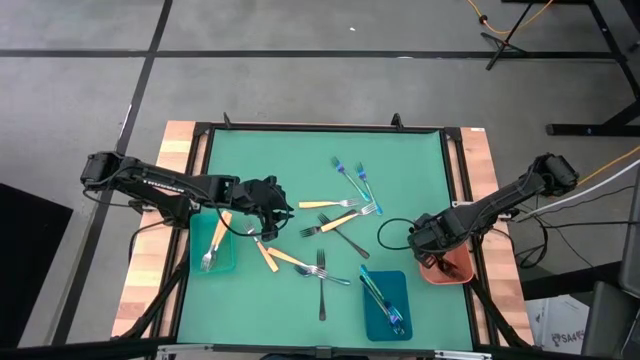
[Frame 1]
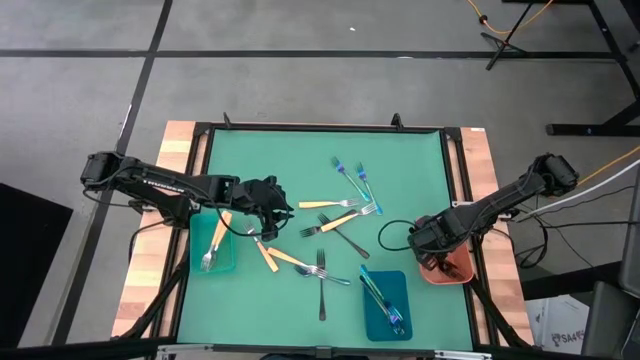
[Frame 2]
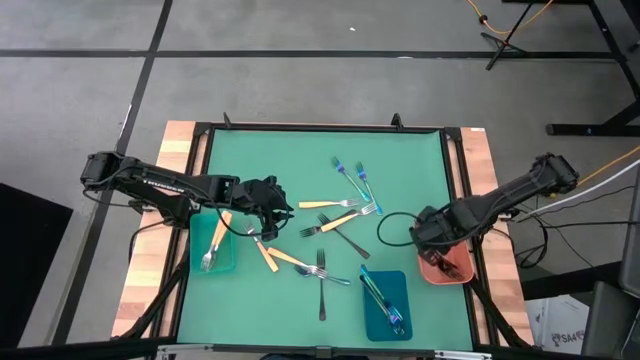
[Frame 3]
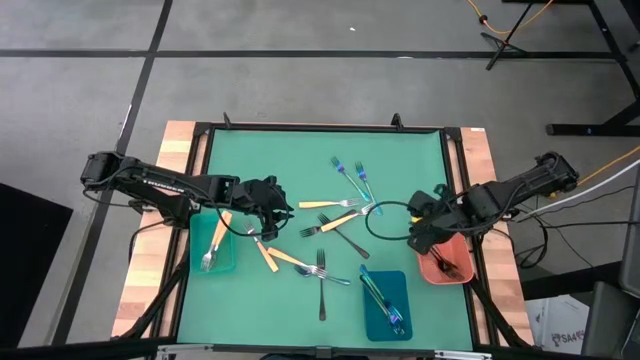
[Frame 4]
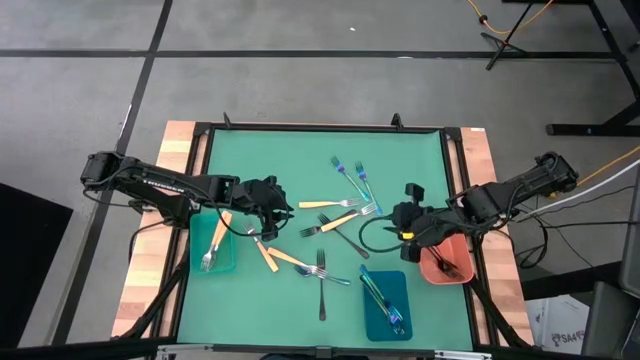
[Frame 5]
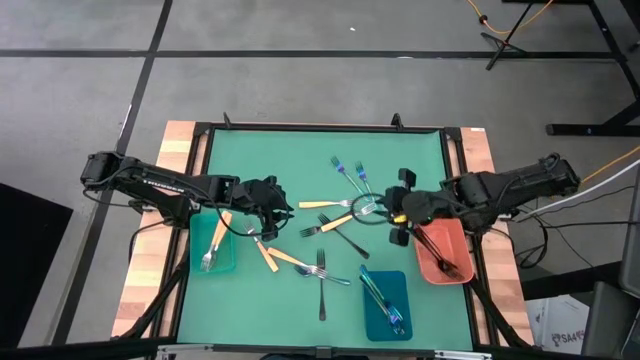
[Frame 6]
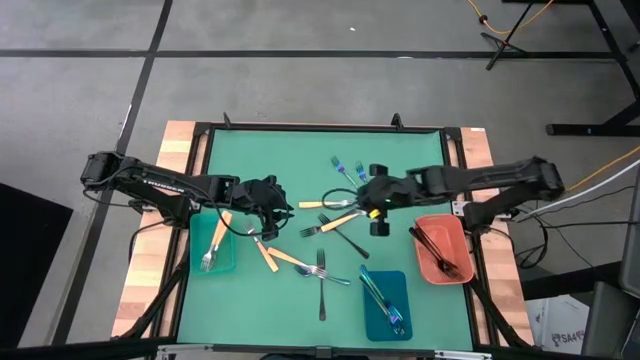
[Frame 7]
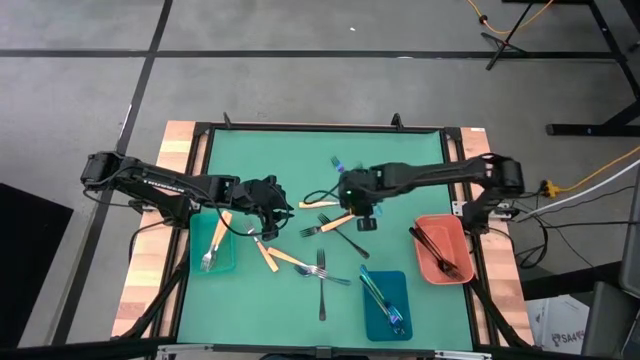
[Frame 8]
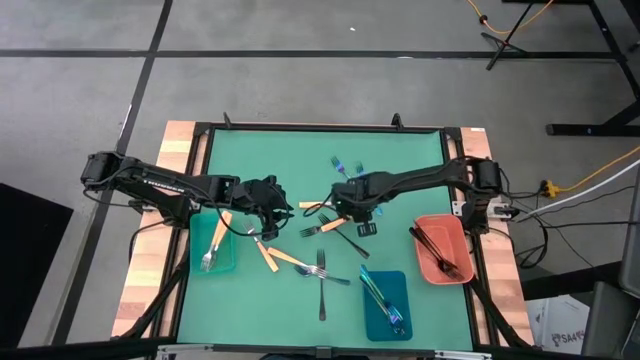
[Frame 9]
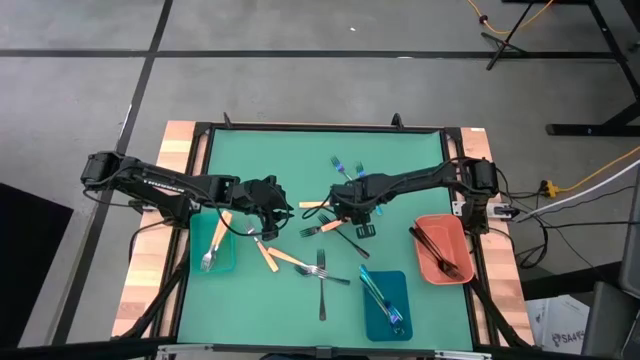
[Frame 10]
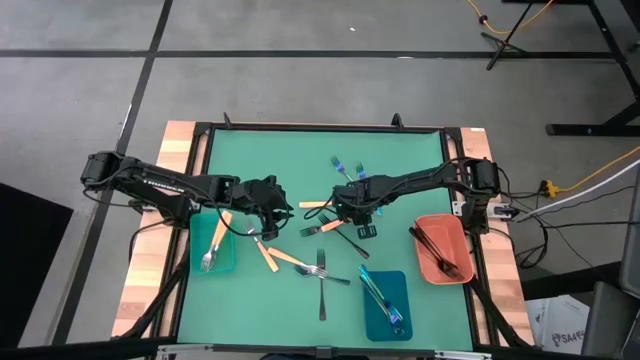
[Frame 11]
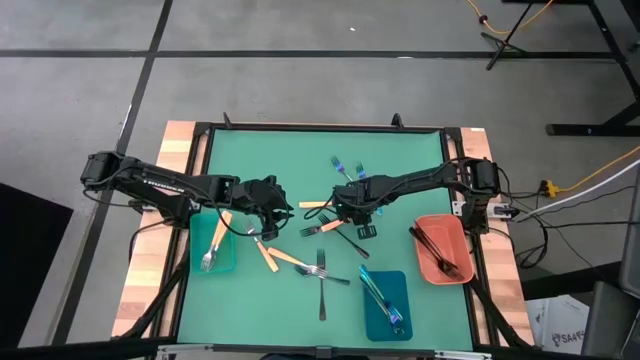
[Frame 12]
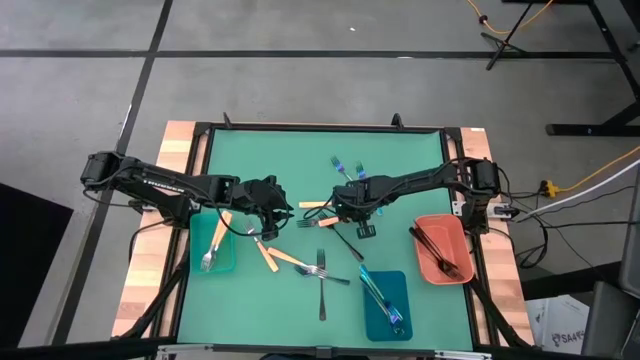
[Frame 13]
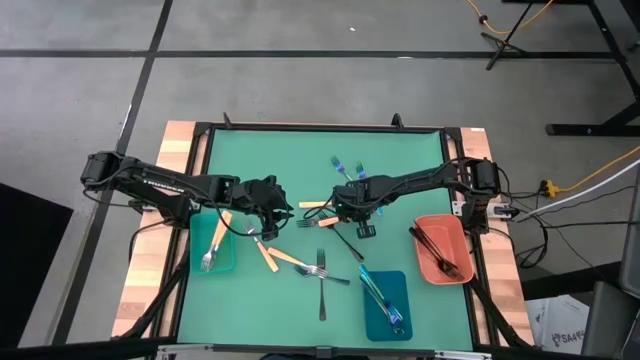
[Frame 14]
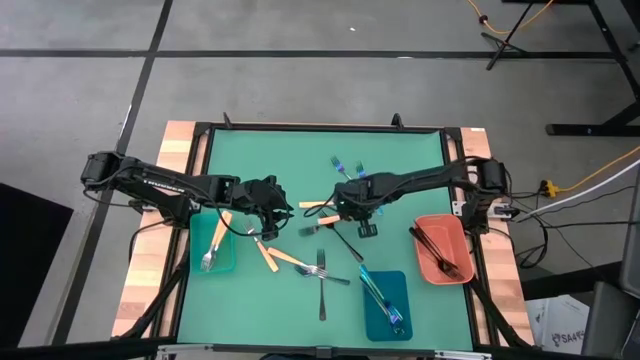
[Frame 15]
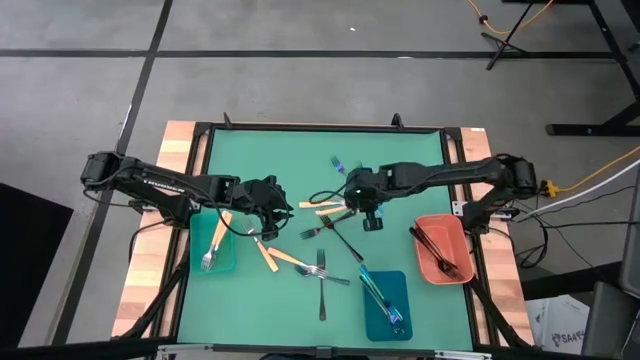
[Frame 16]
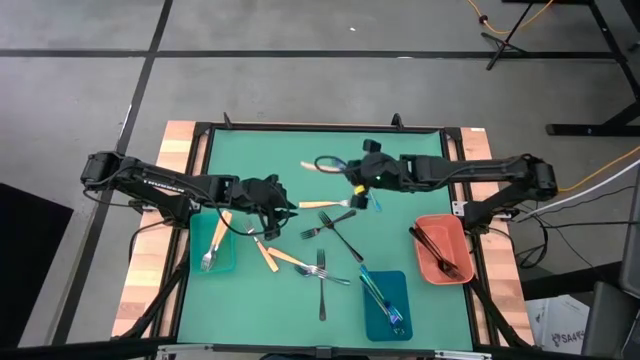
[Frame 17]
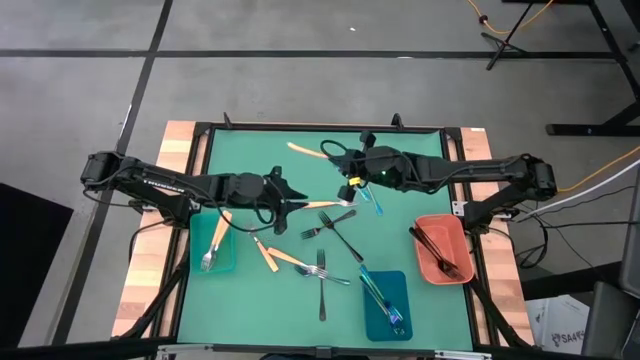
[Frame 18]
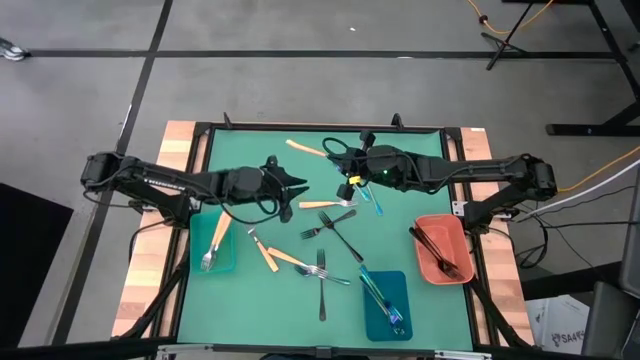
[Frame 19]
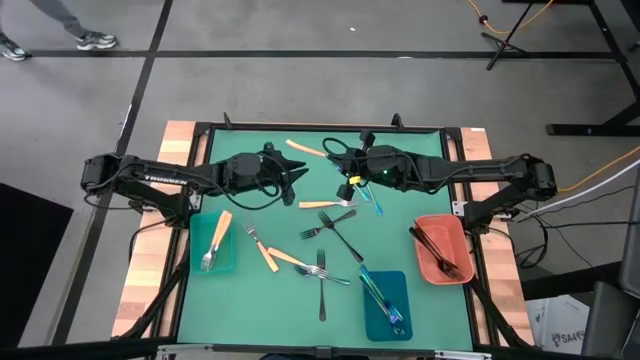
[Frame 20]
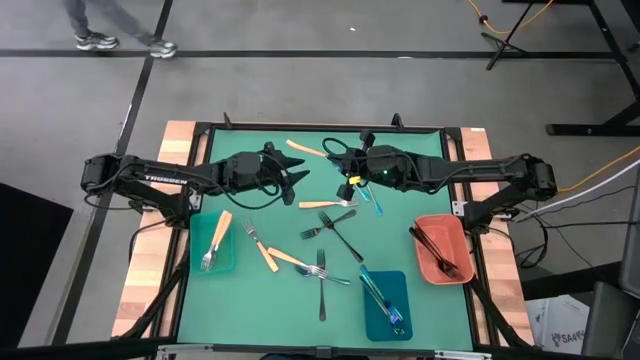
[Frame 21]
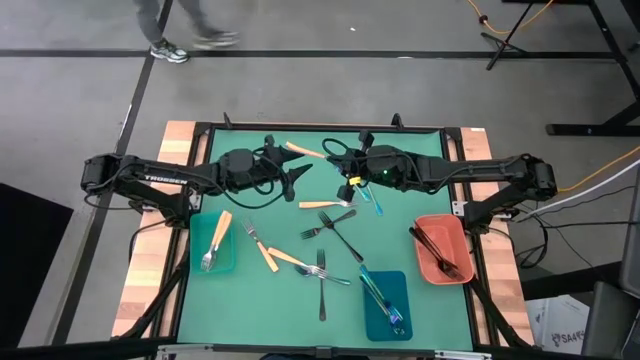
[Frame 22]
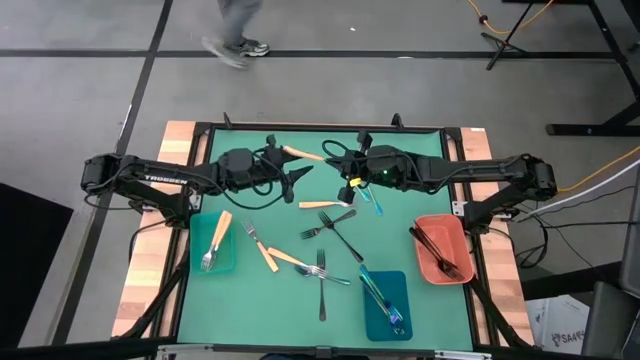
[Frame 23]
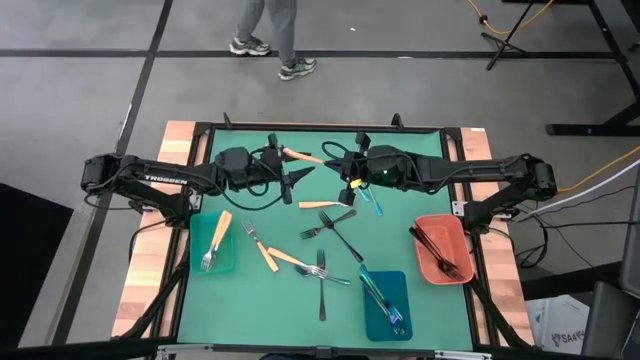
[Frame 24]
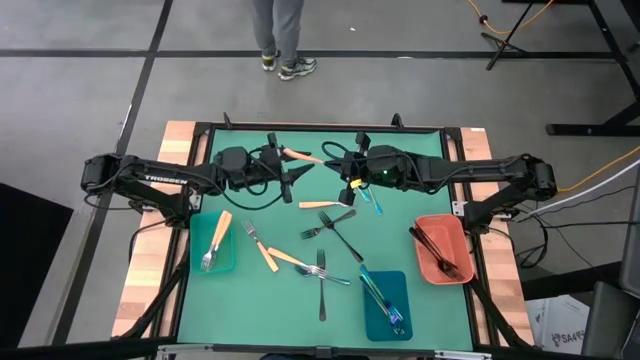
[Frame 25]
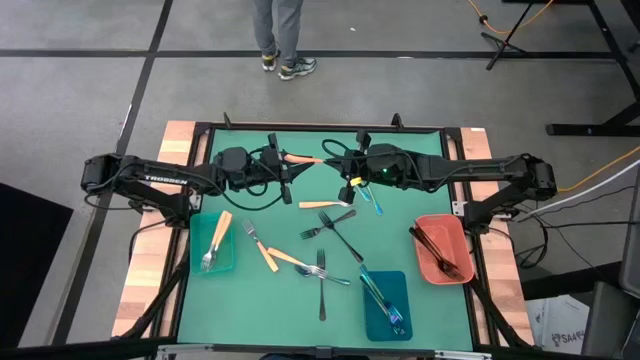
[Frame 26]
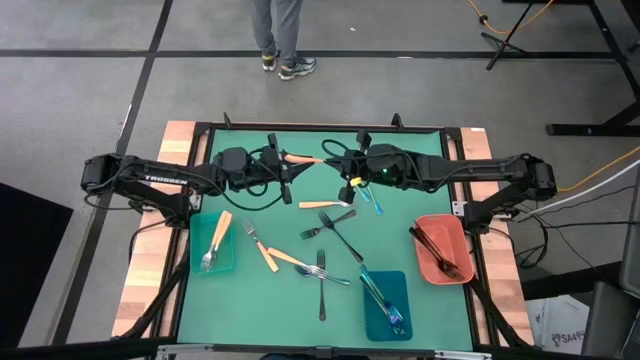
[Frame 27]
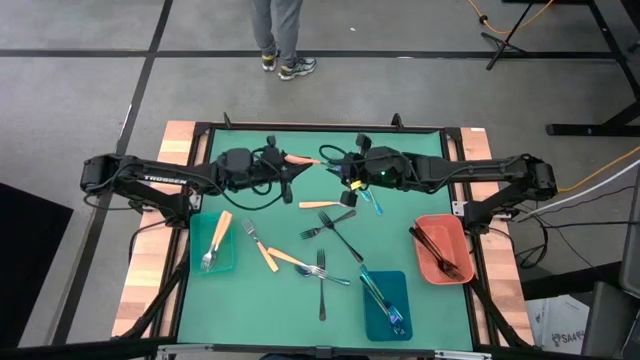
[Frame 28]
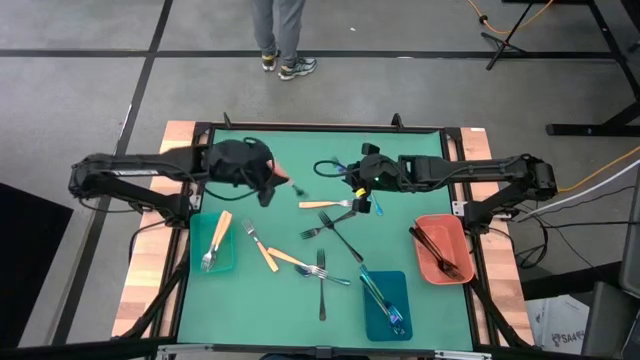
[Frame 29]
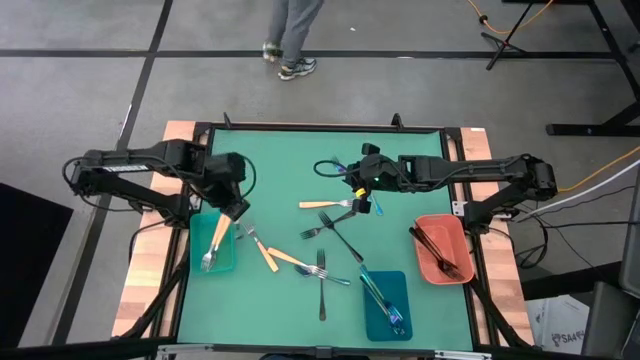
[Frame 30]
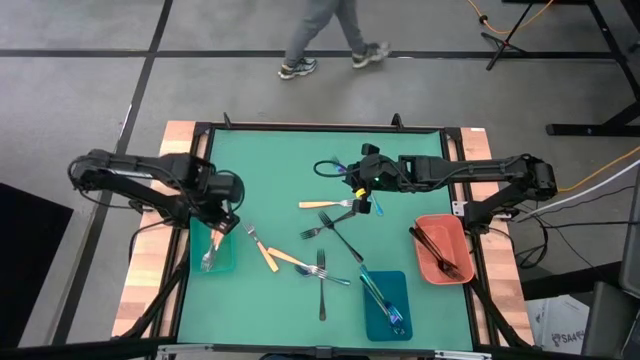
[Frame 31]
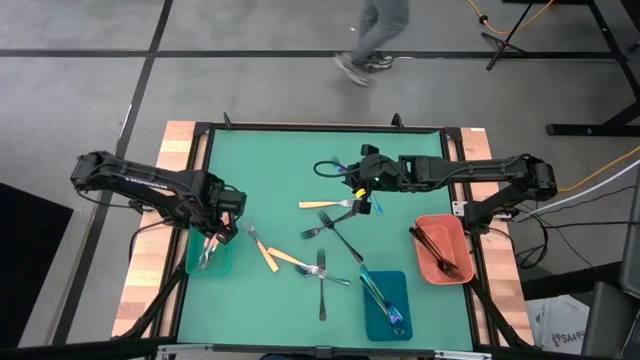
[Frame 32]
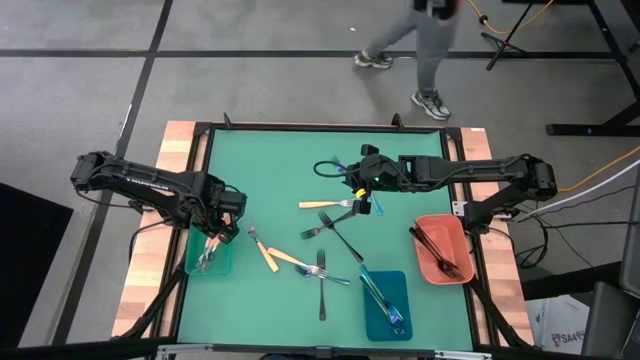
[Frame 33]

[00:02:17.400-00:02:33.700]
Task: Sort silverware by color (type)
Put the yellow fork into the green bin

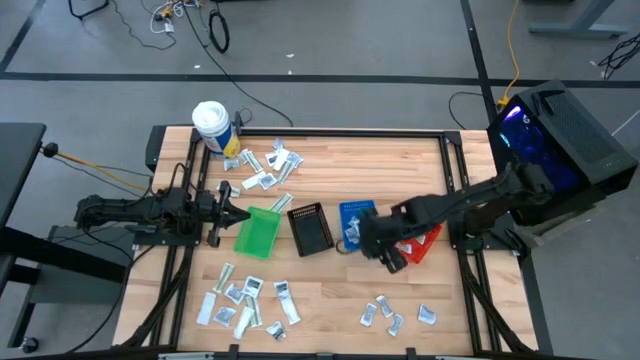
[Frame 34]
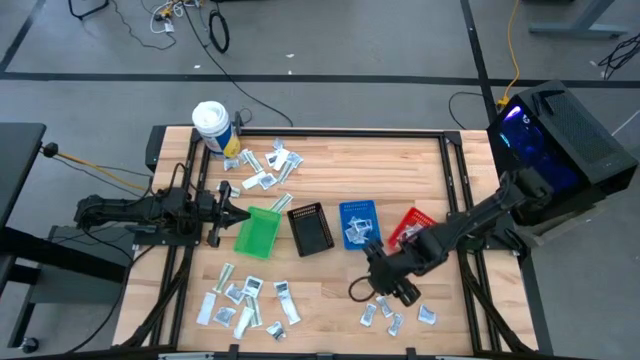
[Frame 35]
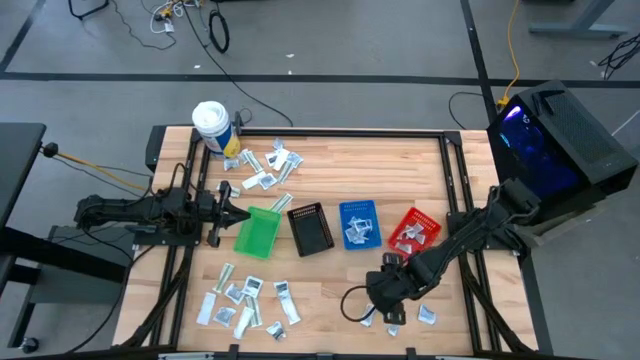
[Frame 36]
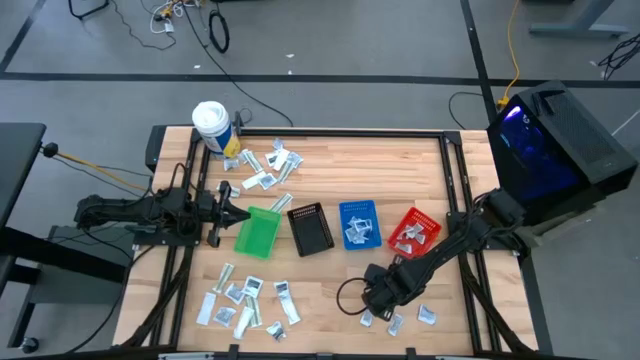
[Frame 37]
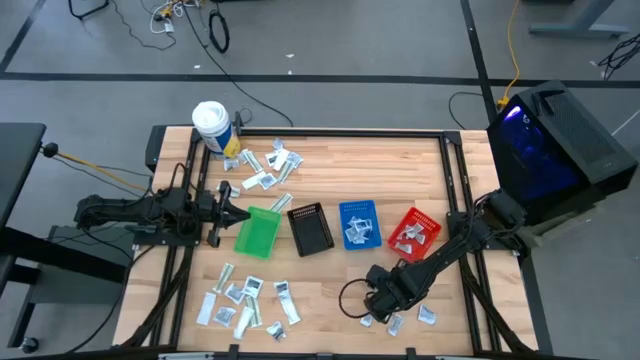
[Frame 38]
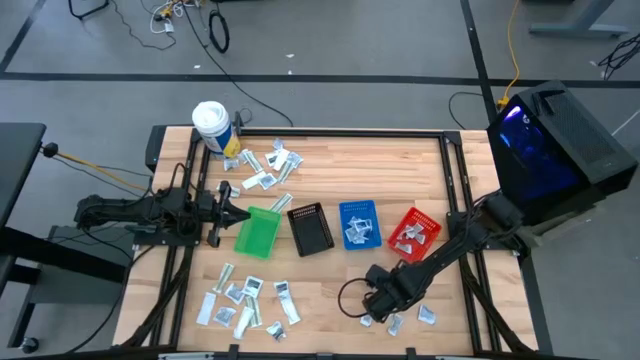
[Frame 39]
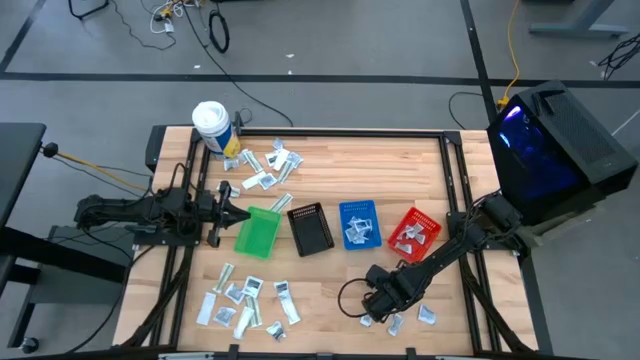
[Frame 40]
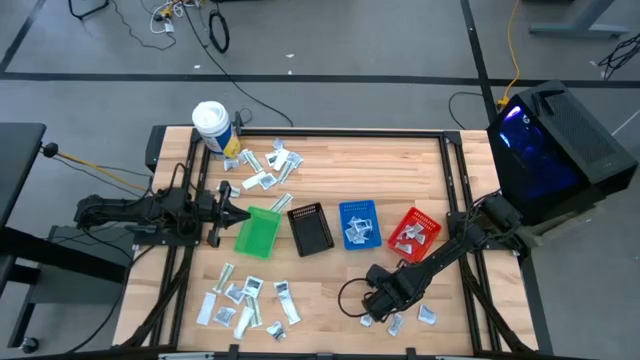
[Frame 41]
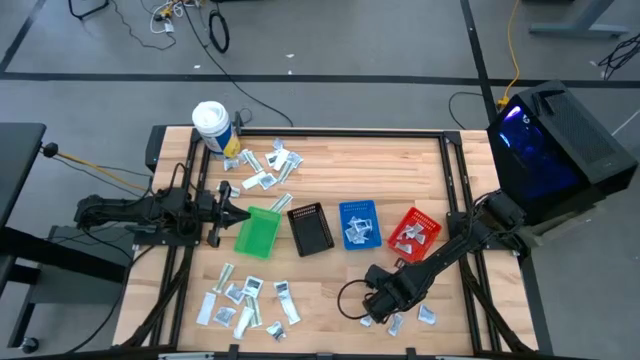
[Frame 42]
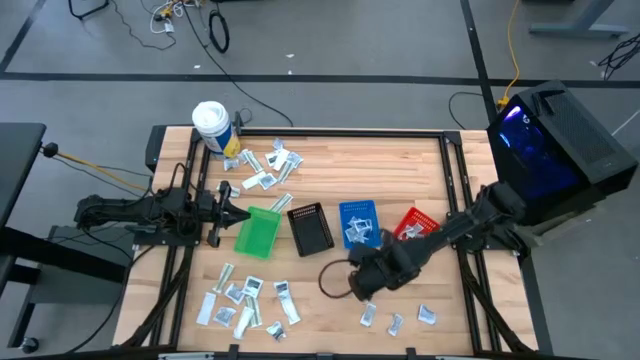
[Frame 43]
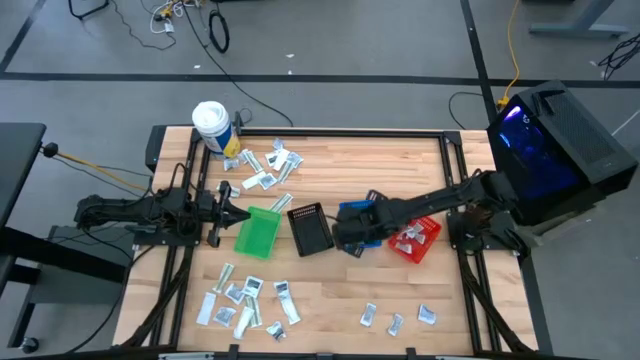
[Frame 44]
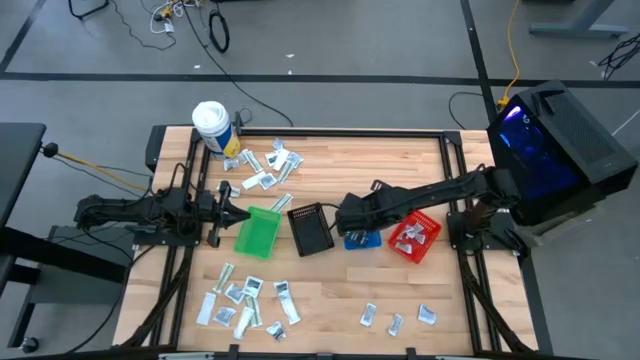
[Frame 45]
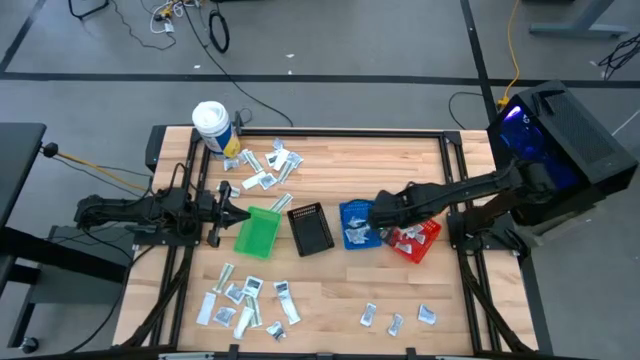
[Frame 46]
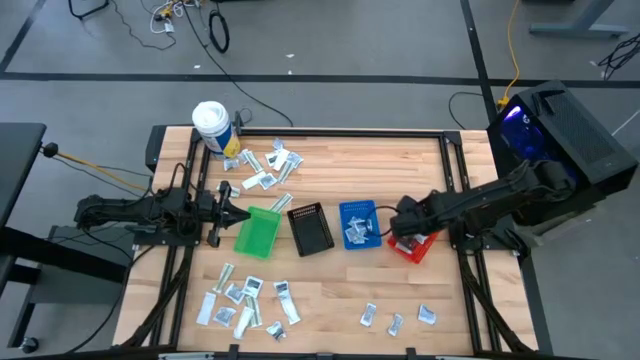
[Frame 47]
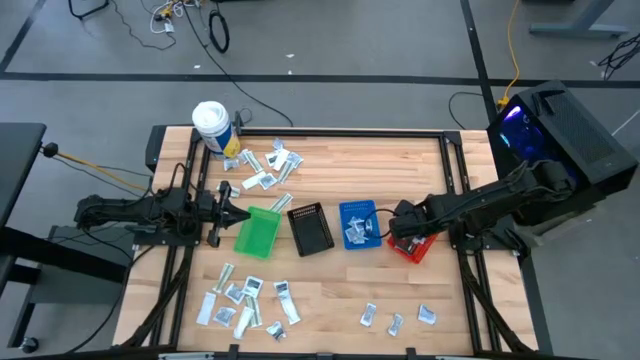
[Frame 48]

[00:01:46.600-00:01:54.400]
Task: Pick & Place First Aid Supplies
Put the ointment pack into the red basket
